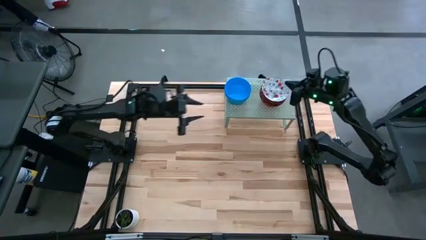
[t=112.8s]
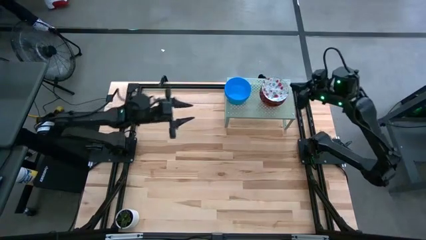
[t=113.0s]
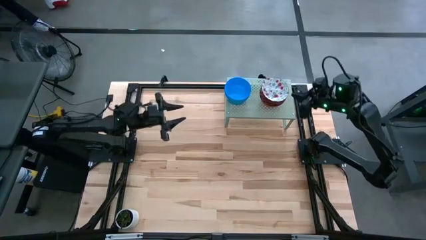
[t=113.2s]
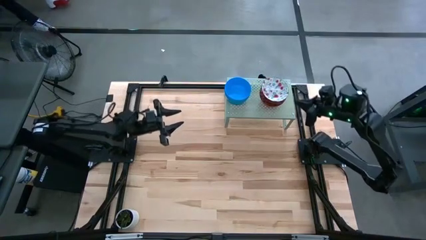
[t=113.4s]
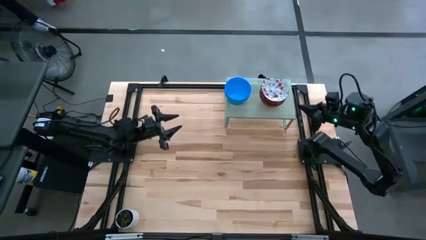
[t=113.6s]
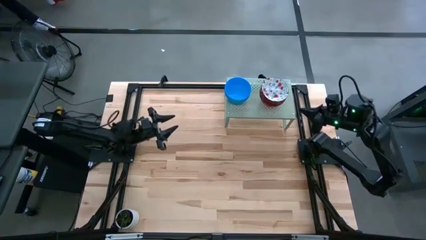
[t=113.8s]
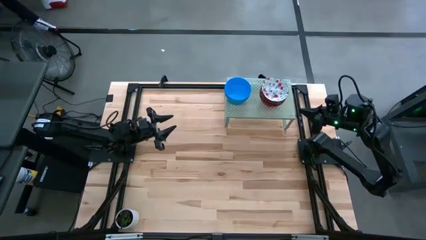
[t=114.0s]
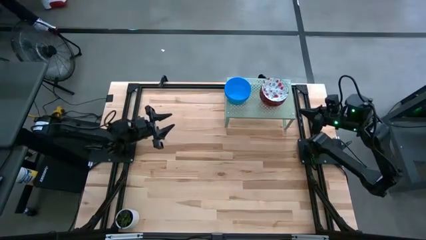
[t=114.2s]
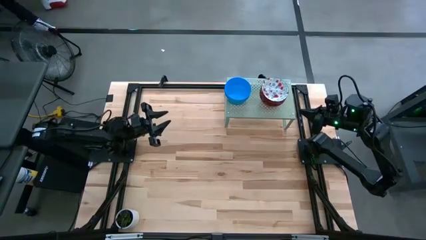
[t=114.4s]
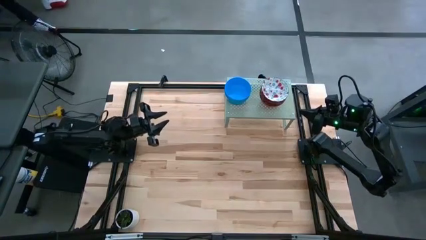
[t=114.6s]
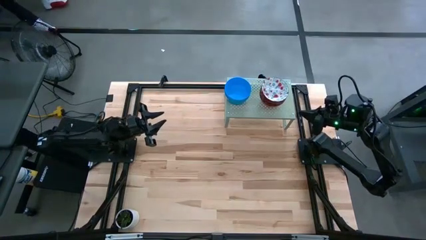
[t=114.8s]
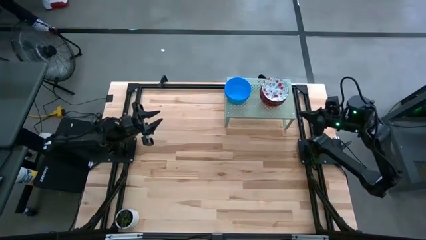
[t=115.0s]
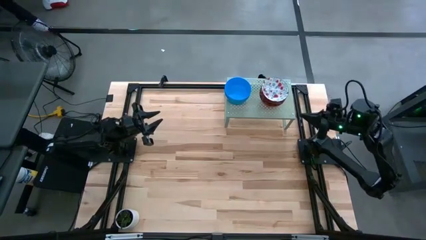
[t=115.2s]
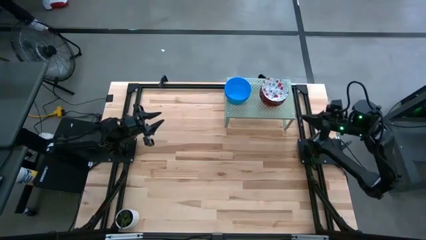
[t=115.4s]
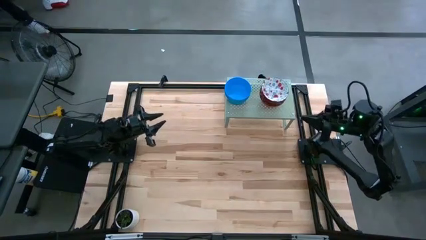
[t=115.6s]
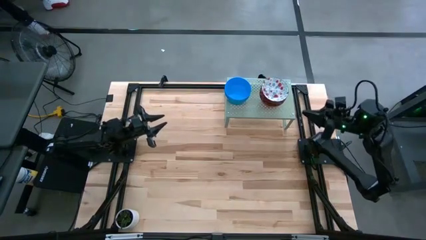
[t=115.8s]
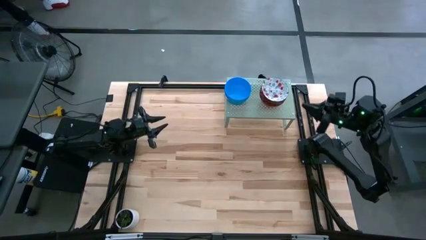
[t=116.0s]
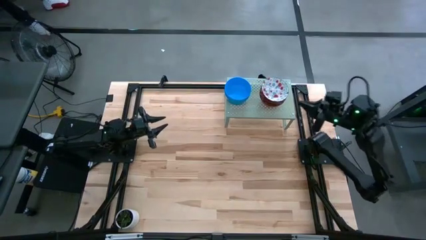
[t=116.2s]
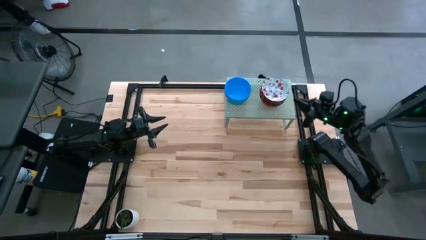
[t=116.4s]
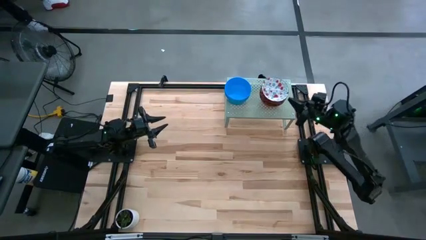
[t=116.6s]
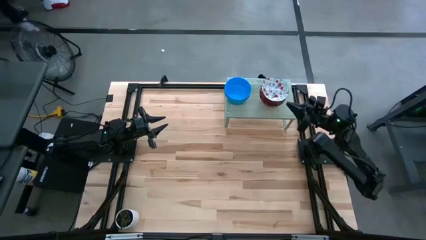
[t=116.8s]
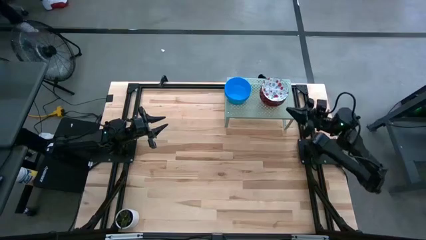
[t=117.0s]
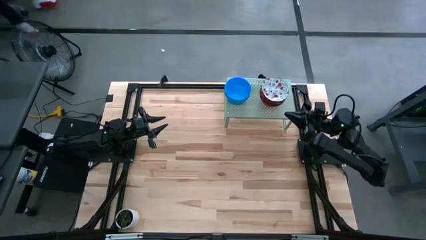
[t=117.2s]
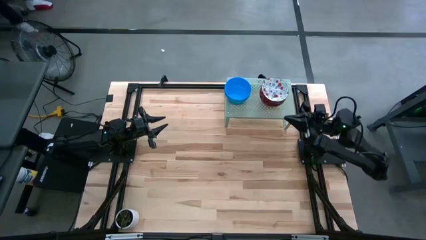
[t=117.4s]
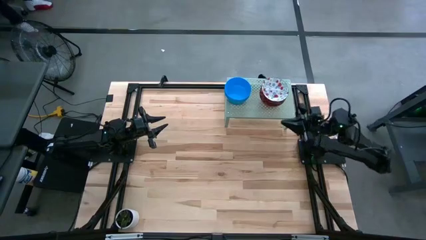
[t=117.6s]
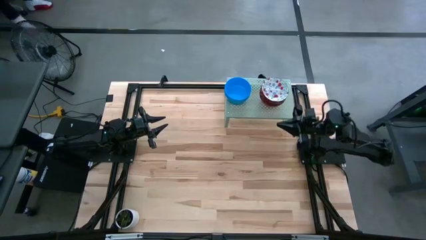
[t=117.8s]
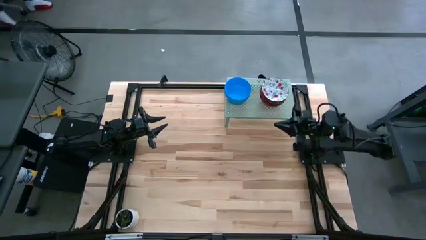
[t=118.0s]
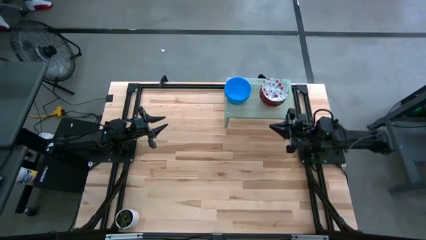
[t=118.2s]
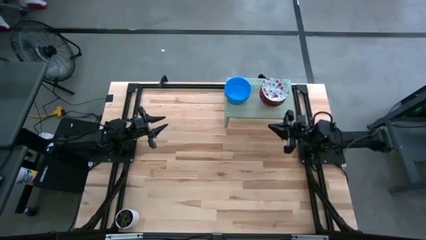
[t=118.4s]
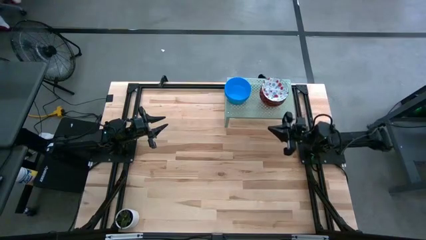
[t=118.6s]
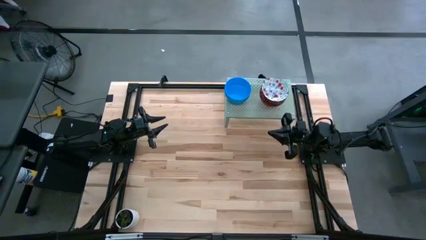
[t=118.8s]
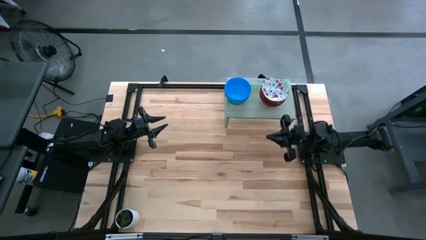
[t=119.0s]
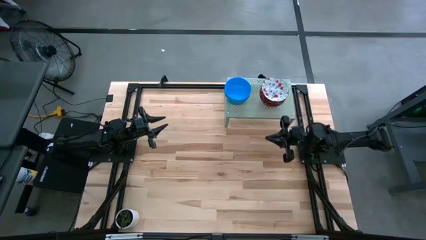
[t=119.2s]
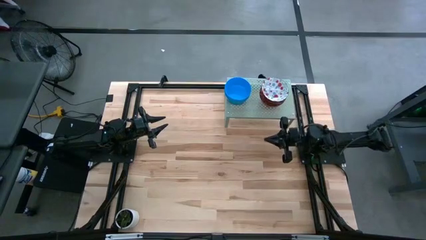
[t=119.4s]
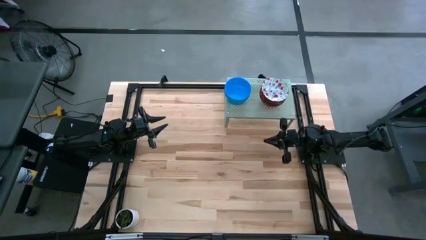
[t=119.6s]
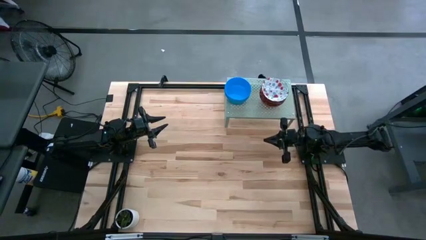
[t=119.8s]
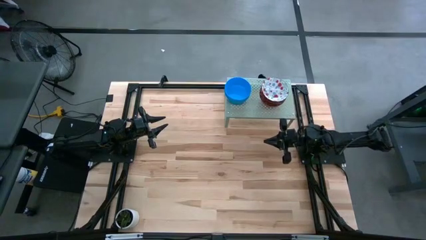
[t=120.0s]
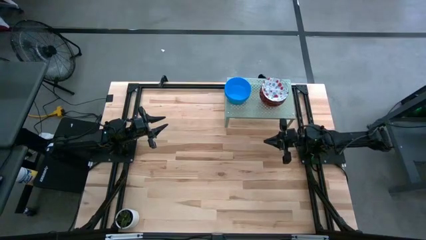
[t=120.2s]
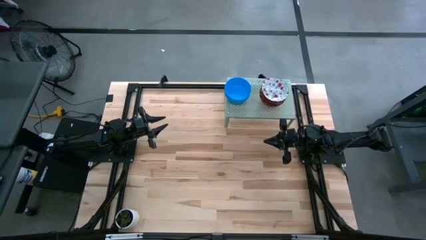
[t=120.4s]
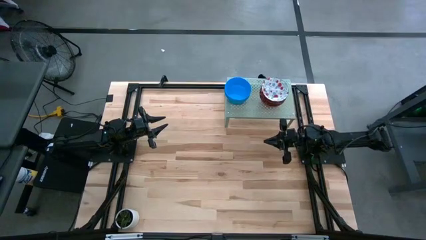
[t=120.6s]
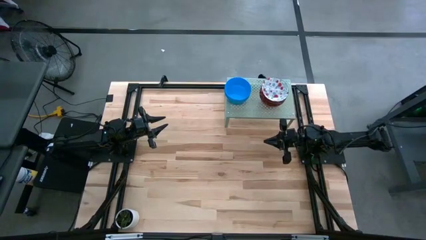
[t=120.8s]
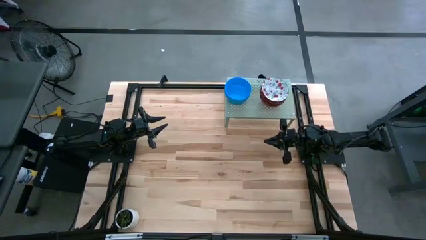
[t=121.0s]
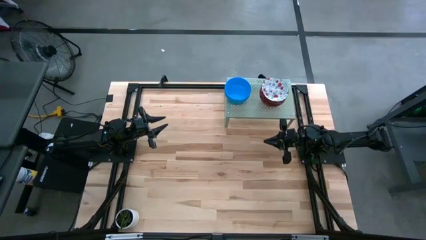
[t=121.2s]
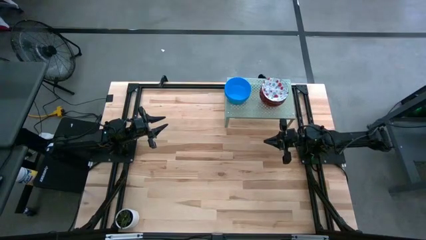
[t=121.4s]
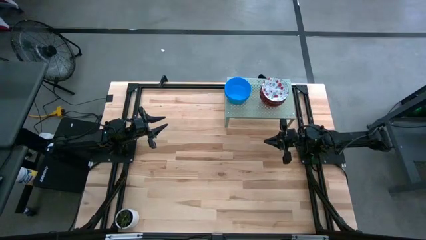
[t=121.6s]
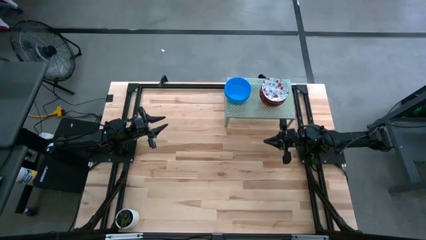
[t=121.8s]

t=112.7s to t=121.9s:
Task: Pick & Place Mini bowls
Return to Home Position

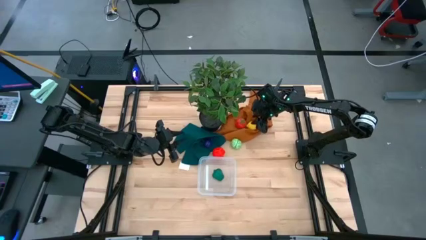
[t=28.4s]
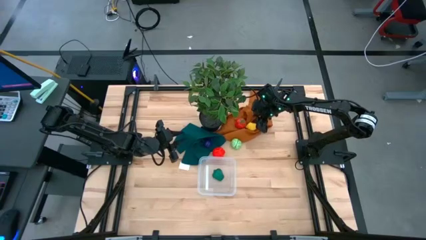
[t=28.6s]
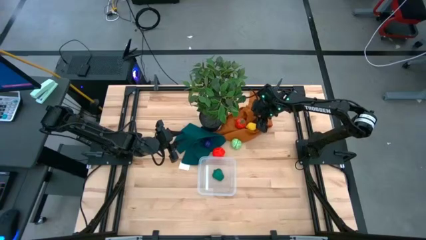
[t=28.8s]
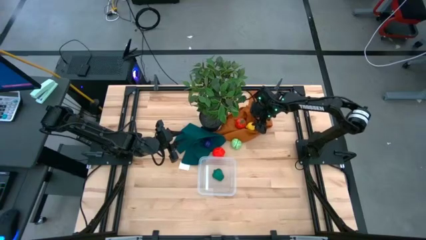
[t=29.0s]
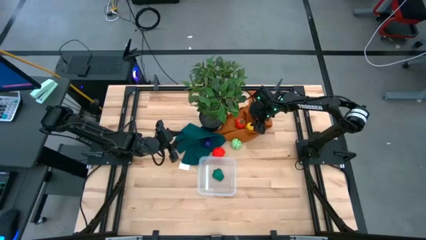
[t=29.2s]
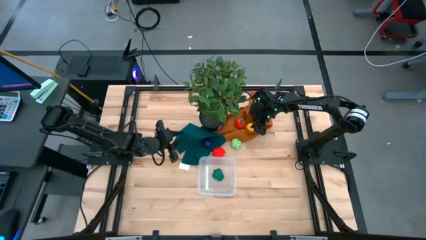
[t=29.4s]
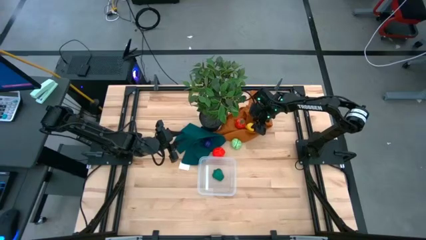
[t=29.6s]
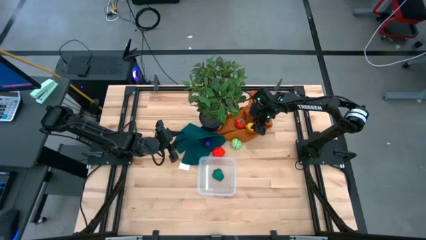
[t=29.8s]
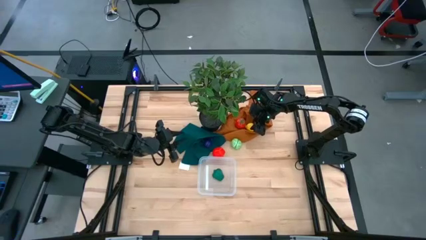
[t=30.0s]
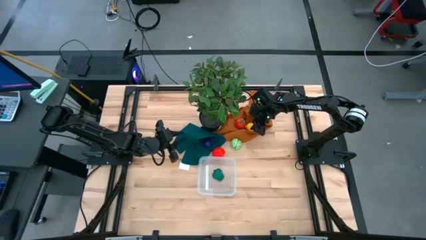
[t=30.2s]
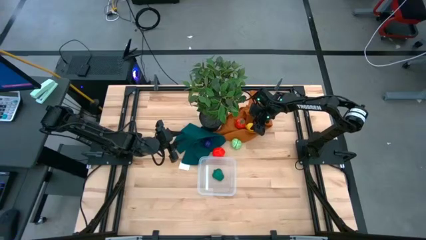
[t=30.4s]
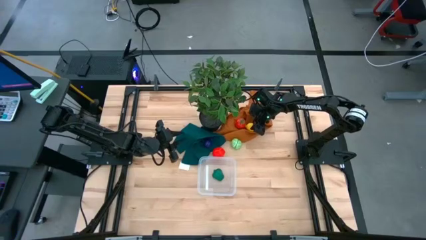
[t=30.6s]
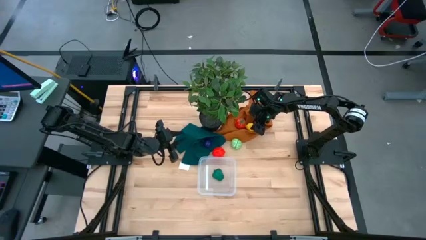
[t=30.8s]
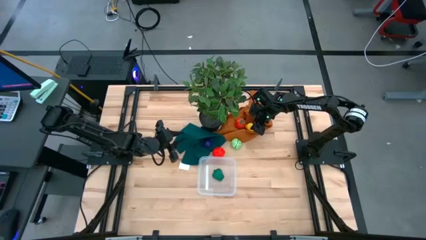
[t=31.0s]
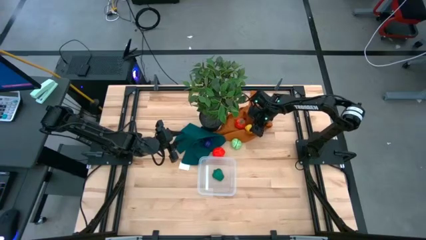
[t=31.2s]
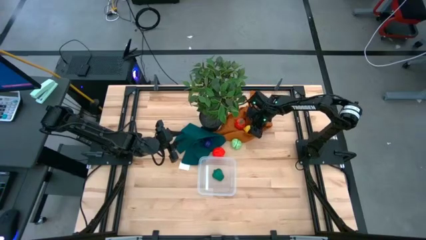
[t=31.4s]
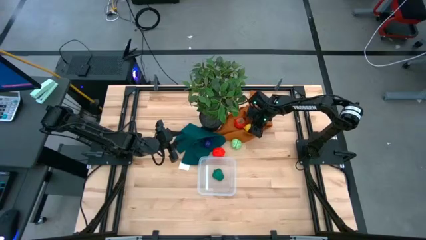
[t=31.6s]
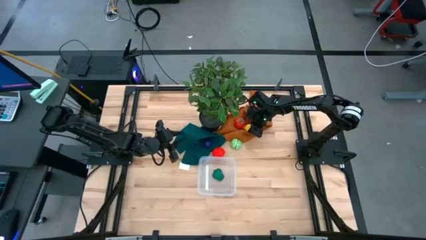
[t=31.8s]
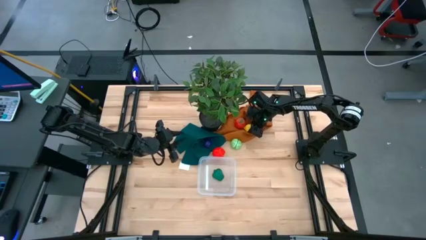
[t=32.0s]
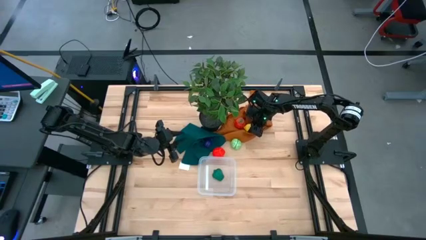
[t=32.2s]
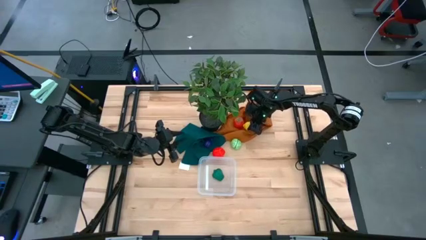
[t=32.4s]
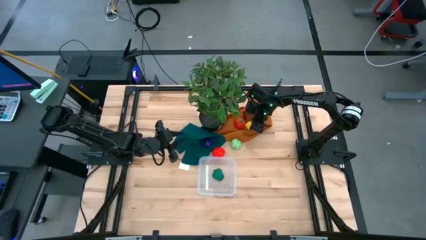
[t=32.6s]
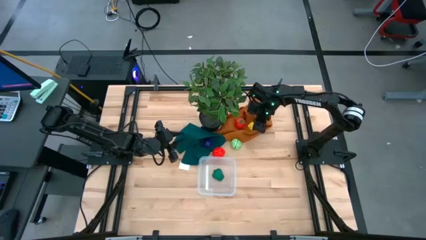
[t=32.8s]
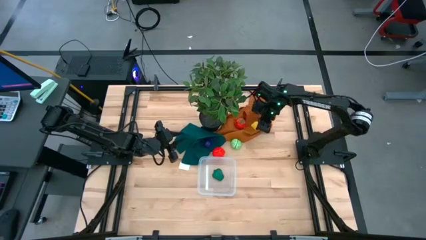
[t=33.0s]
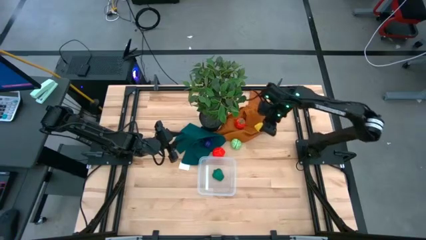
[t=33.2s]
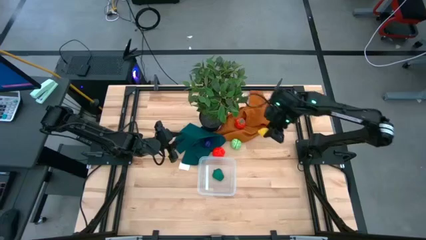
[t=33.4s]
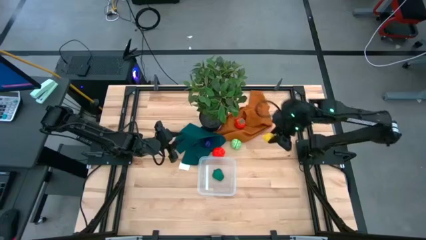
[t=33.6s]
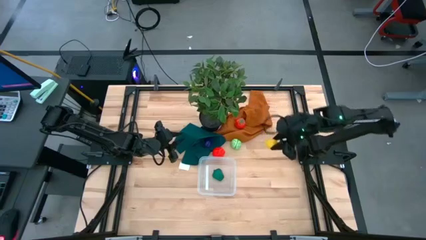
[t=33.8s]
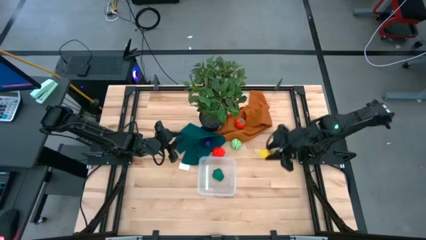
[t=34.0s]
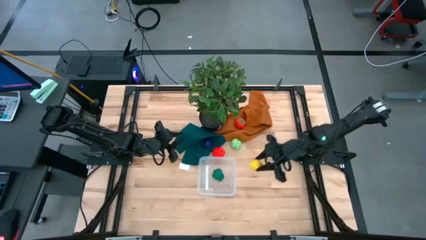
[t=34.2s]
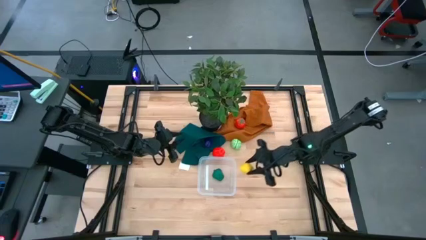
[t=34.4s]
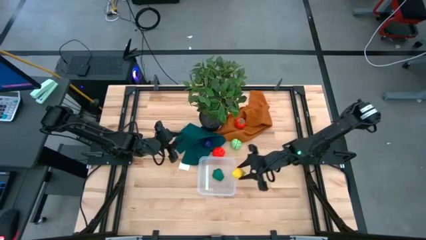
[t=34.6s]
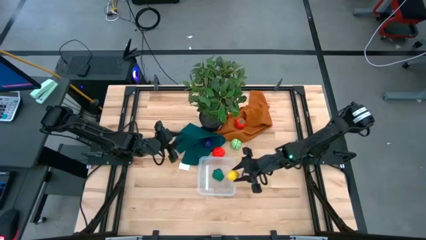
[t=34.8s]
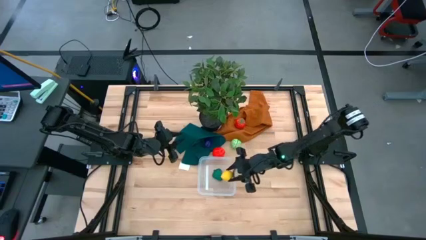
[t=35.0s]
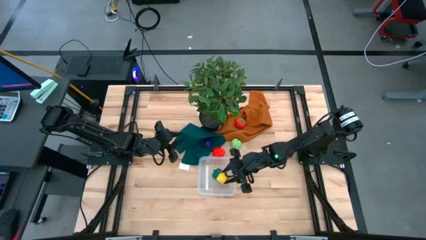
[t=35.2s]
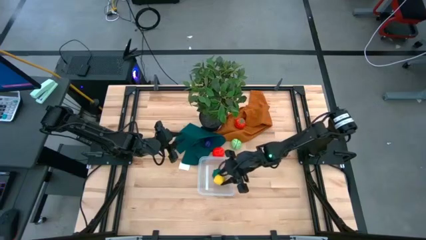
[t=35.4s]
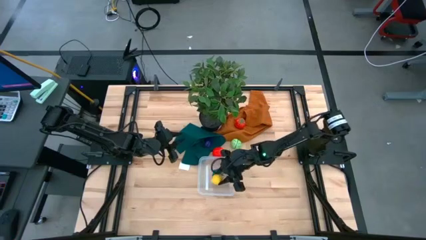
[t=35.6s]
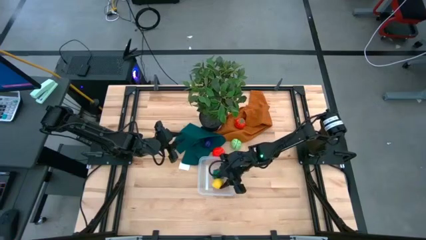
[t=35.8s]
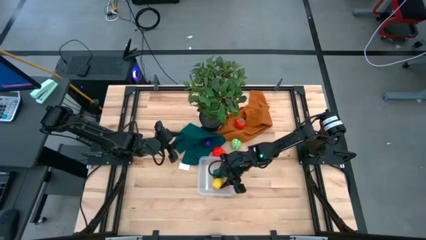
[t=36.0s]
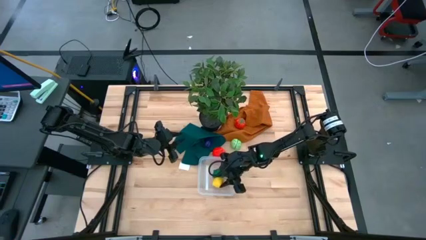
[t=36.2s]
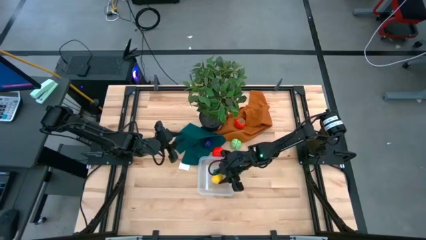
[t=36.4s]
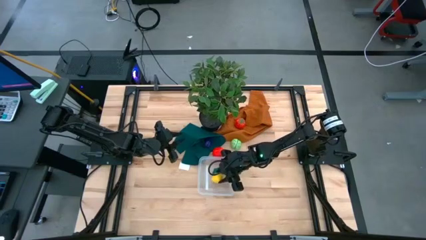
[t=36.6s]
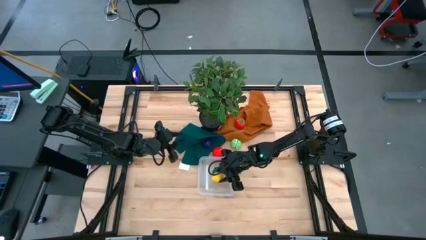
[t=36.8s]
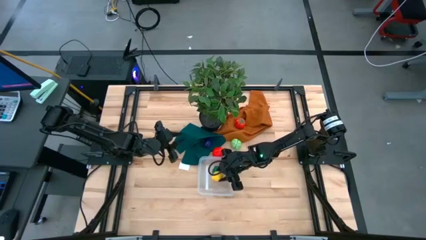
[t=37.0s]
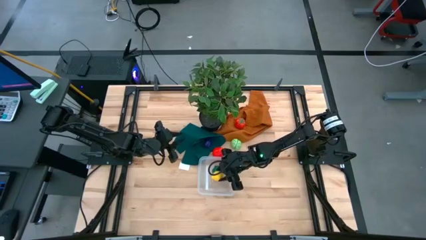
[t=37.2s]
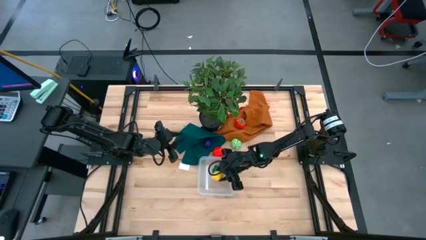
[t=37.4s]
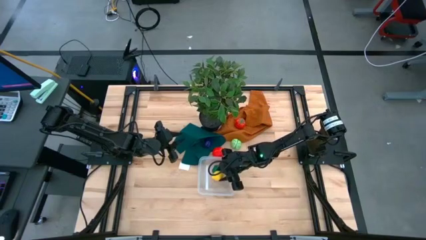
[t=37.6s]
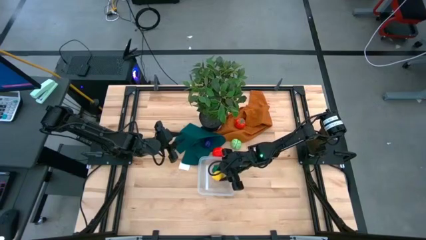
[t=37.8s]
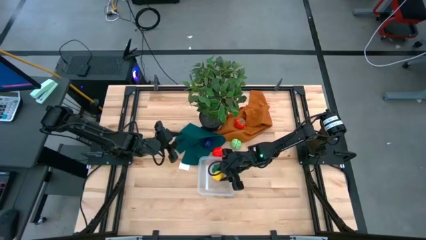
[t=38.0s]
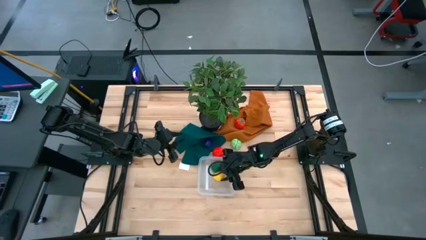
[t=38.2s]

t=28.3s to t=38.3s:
Task: Pick and placing Produce into tupperware
Put the lemon into the transparent bin
